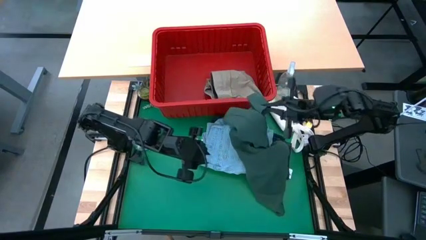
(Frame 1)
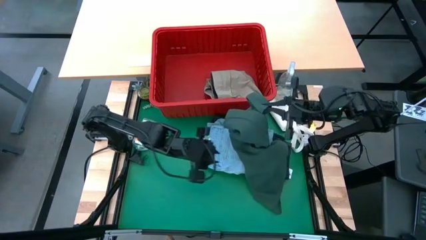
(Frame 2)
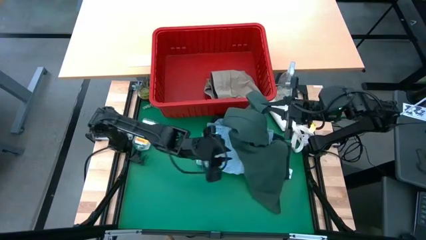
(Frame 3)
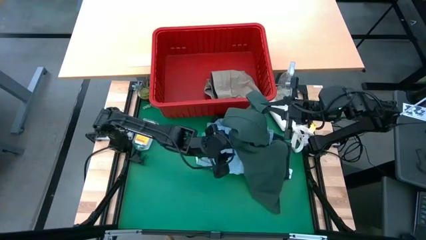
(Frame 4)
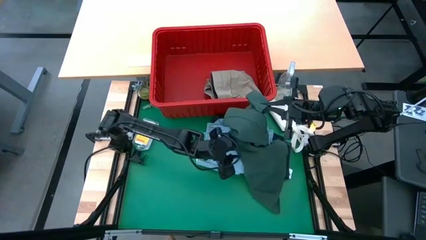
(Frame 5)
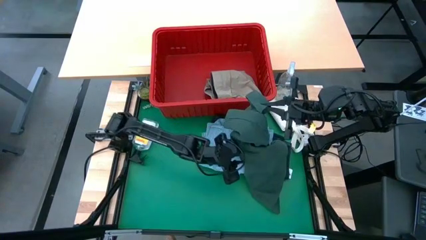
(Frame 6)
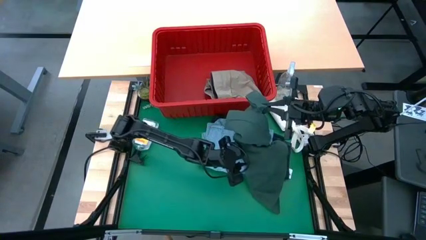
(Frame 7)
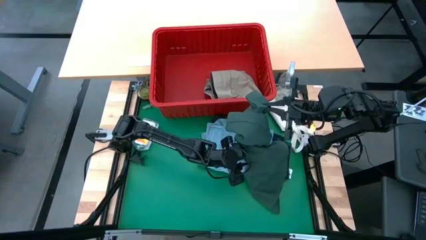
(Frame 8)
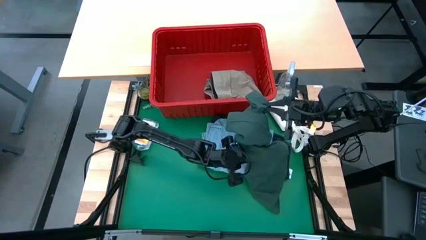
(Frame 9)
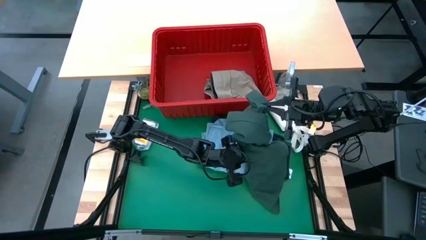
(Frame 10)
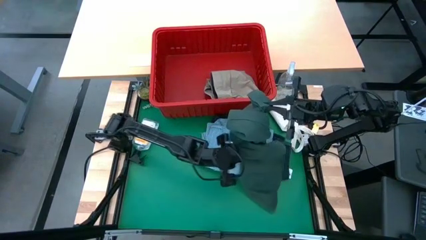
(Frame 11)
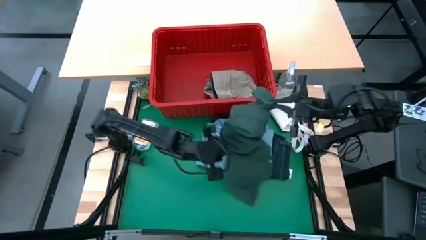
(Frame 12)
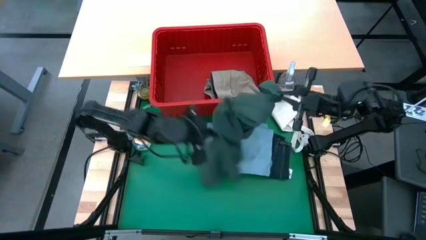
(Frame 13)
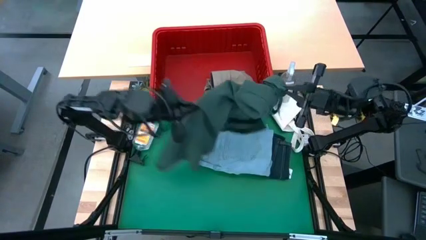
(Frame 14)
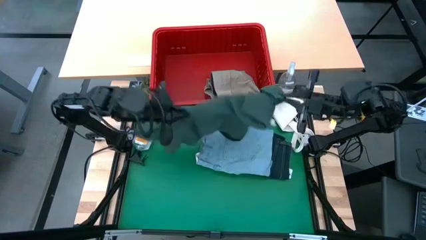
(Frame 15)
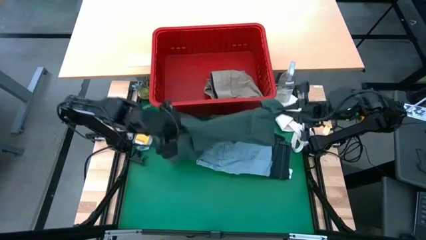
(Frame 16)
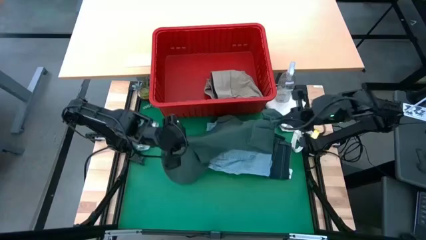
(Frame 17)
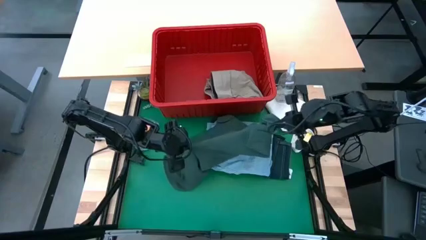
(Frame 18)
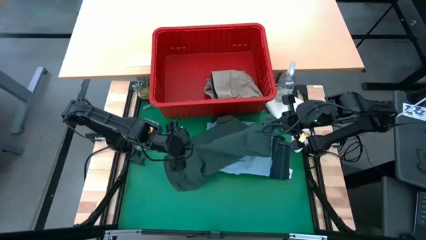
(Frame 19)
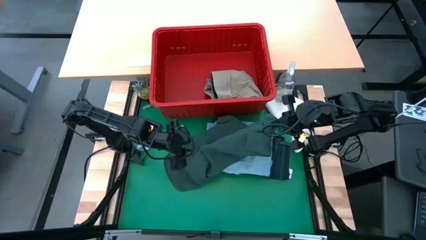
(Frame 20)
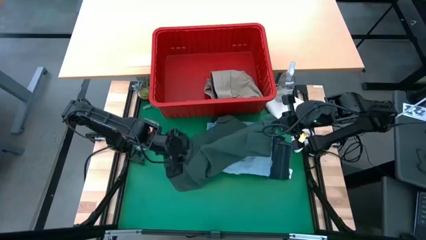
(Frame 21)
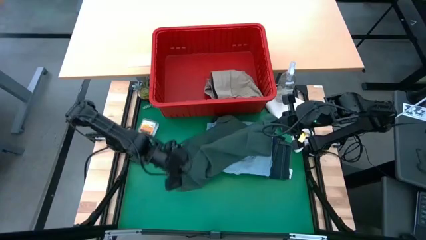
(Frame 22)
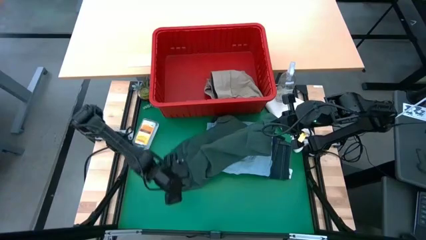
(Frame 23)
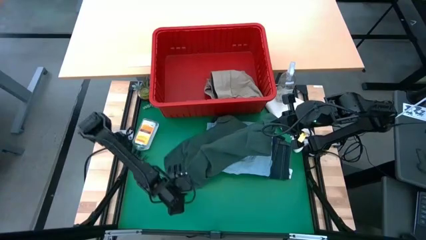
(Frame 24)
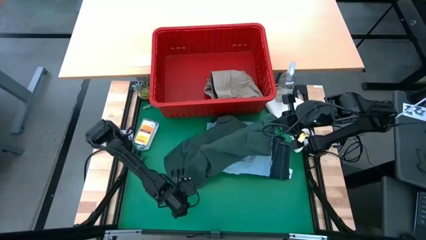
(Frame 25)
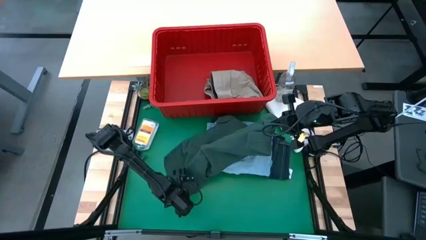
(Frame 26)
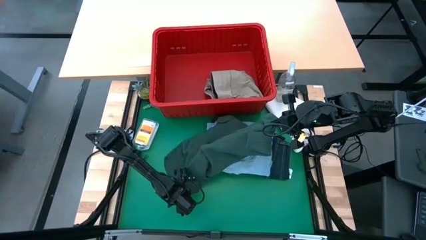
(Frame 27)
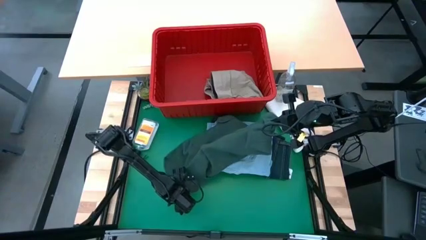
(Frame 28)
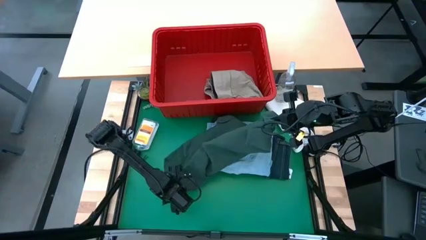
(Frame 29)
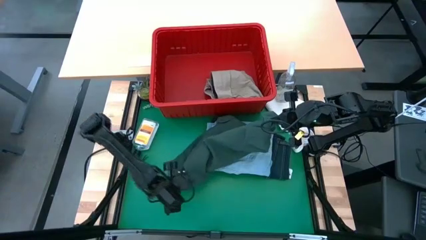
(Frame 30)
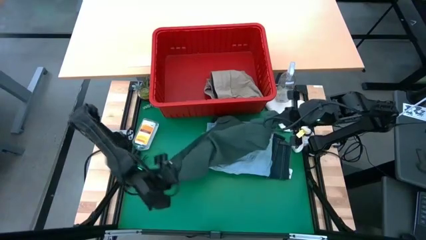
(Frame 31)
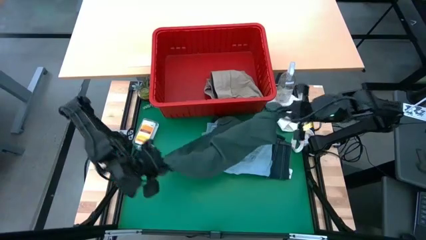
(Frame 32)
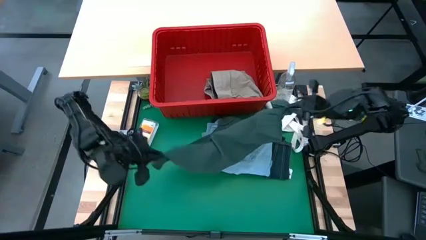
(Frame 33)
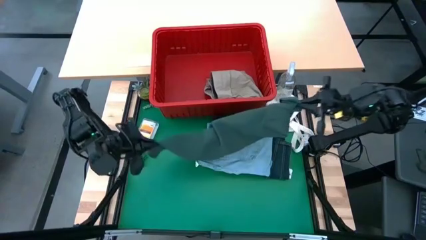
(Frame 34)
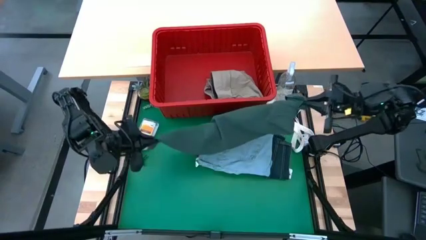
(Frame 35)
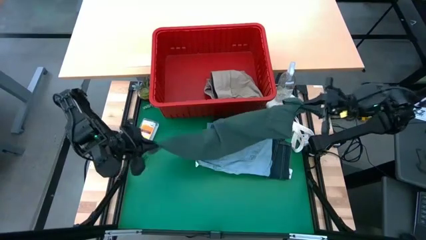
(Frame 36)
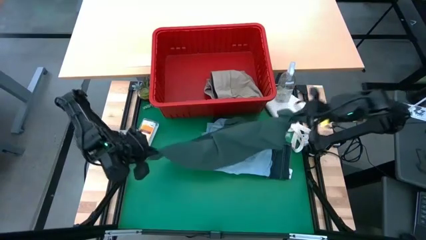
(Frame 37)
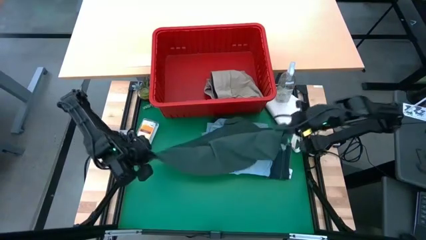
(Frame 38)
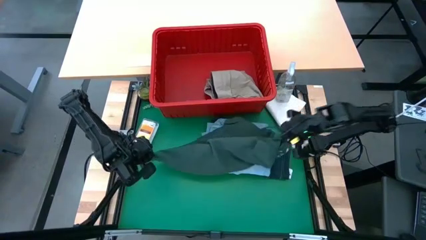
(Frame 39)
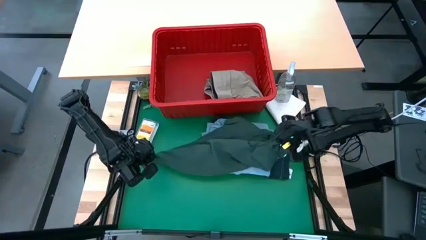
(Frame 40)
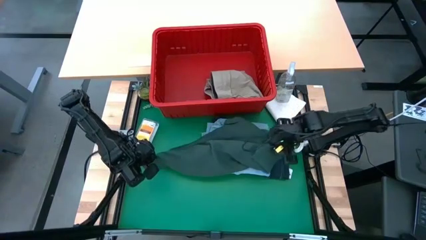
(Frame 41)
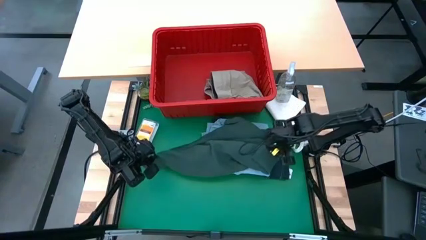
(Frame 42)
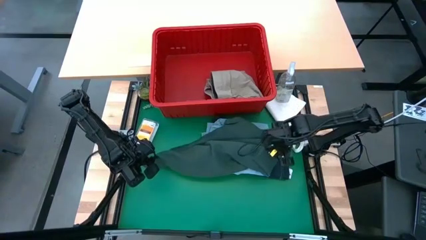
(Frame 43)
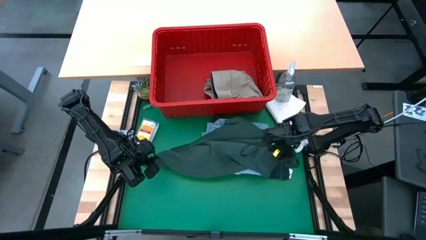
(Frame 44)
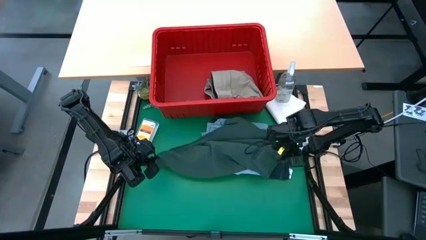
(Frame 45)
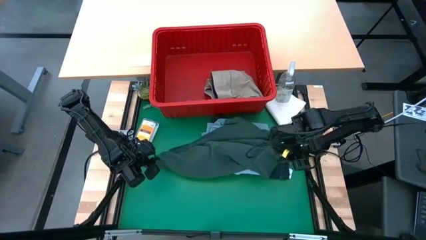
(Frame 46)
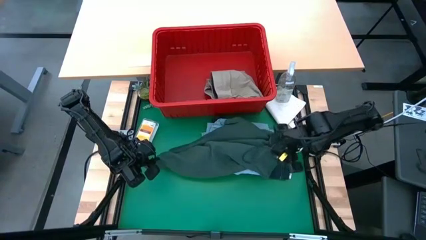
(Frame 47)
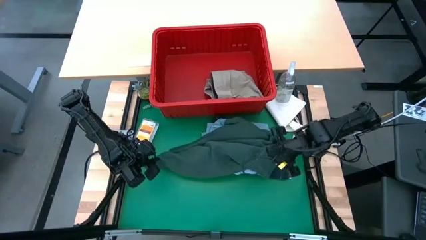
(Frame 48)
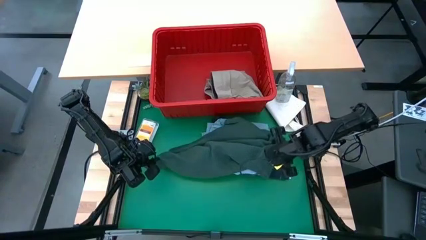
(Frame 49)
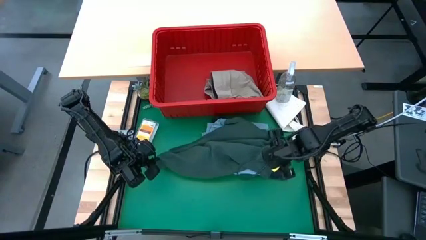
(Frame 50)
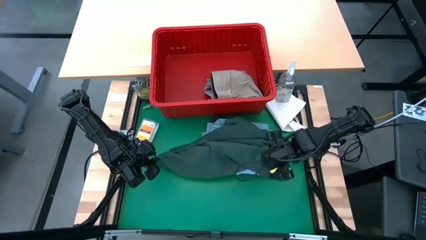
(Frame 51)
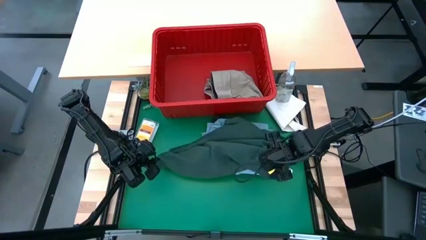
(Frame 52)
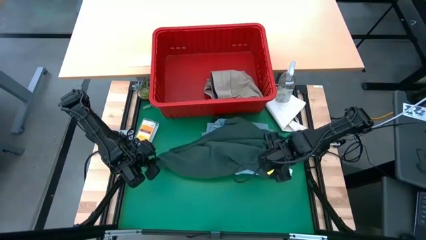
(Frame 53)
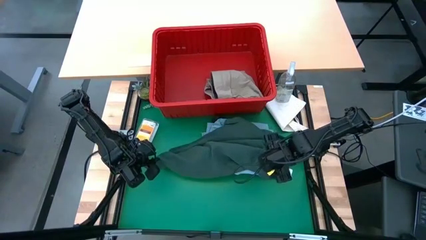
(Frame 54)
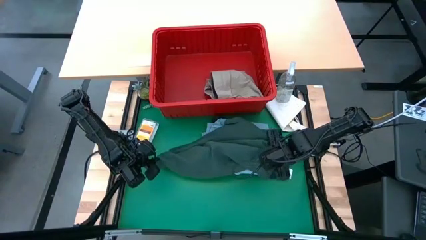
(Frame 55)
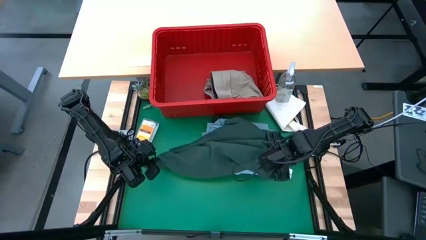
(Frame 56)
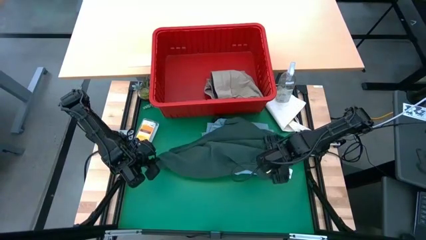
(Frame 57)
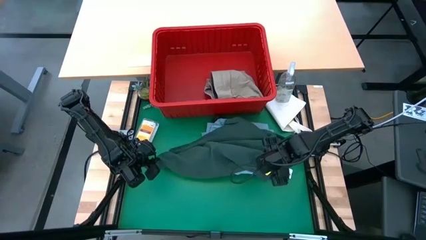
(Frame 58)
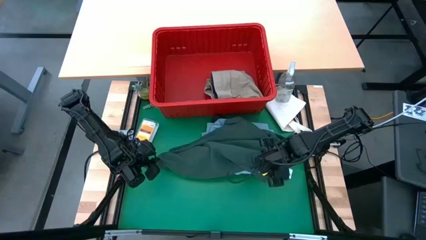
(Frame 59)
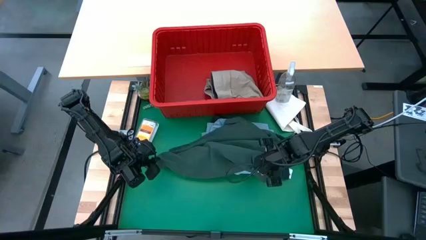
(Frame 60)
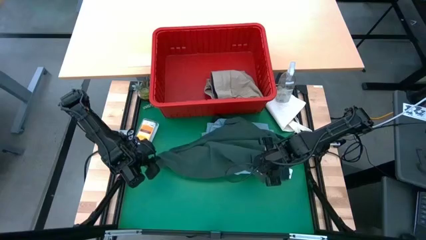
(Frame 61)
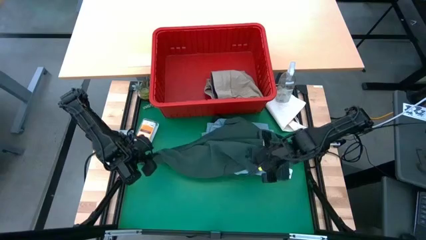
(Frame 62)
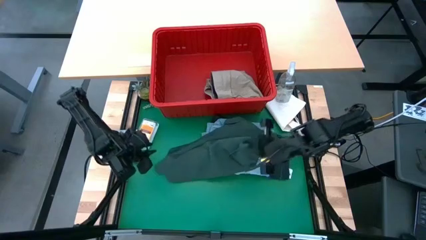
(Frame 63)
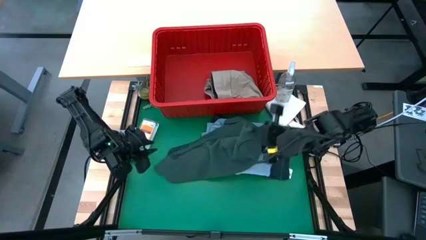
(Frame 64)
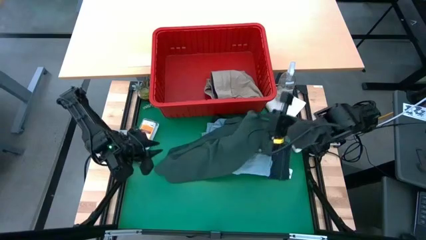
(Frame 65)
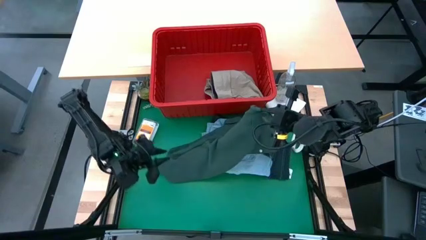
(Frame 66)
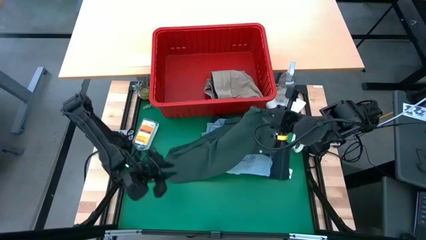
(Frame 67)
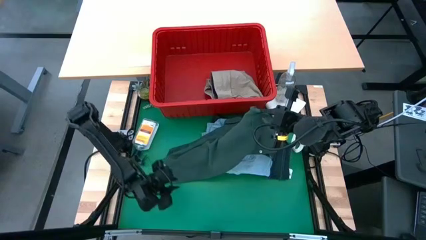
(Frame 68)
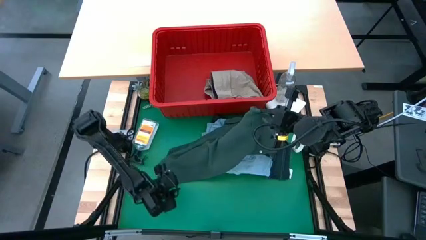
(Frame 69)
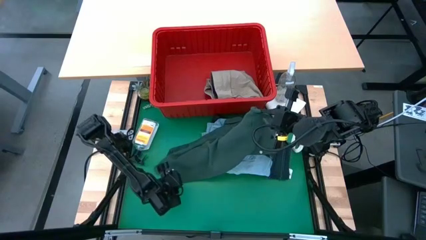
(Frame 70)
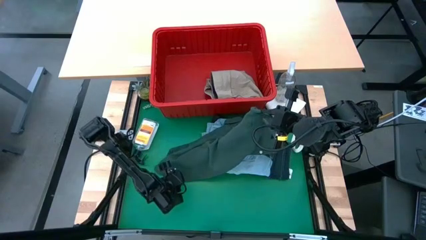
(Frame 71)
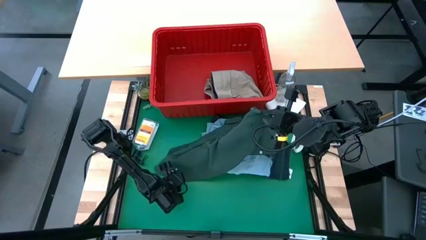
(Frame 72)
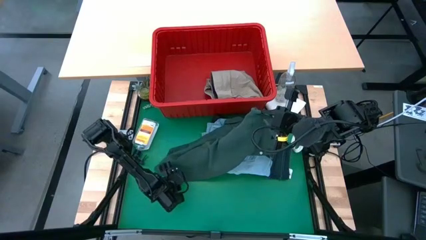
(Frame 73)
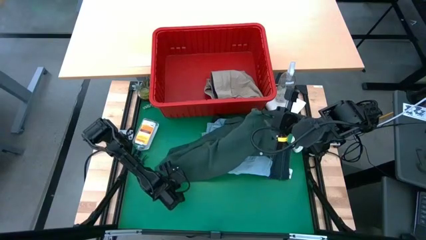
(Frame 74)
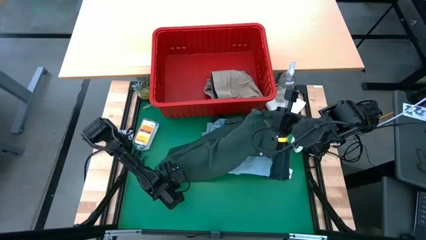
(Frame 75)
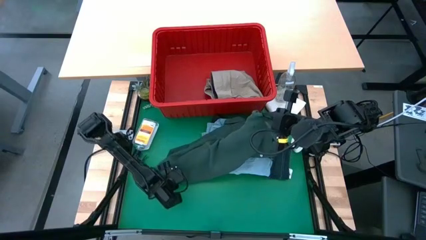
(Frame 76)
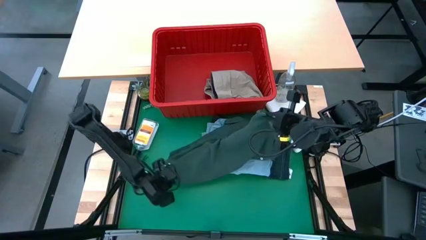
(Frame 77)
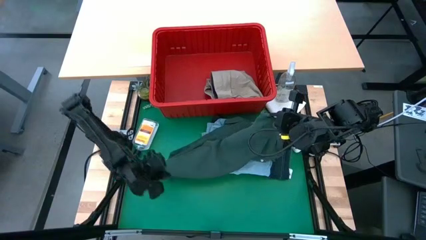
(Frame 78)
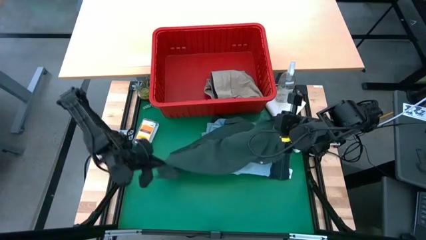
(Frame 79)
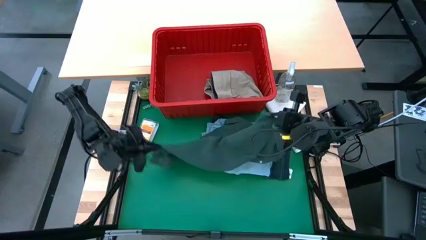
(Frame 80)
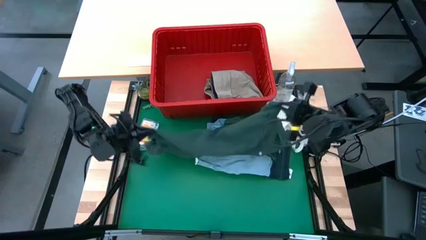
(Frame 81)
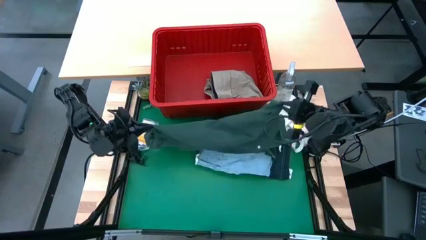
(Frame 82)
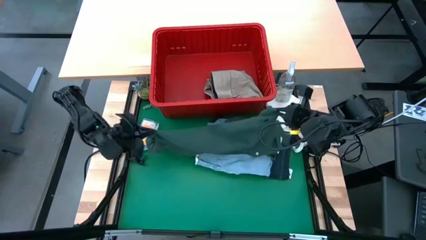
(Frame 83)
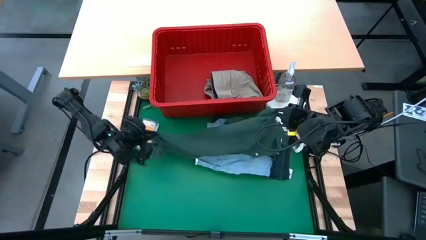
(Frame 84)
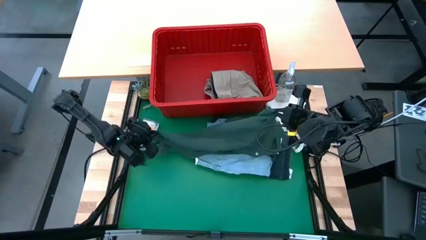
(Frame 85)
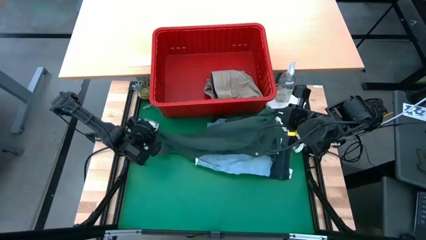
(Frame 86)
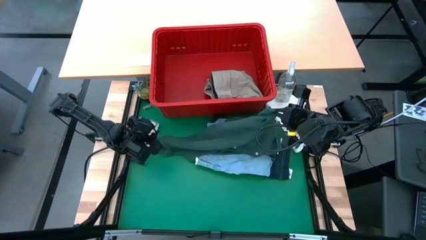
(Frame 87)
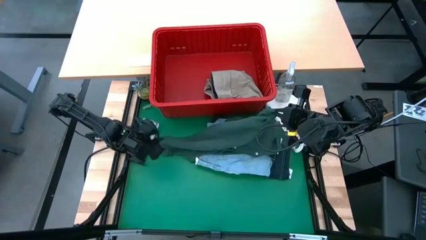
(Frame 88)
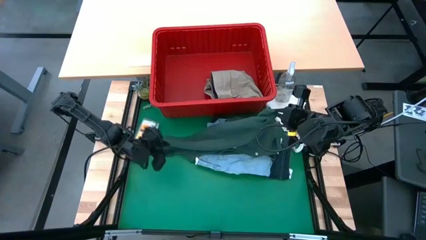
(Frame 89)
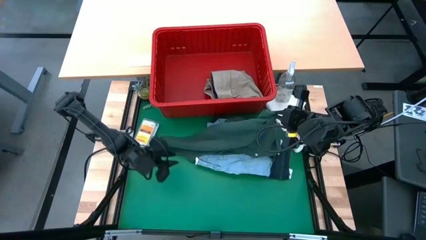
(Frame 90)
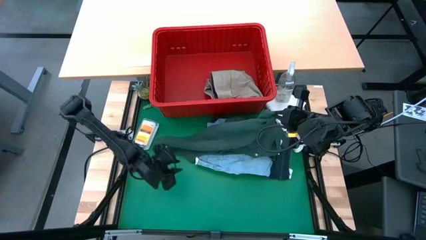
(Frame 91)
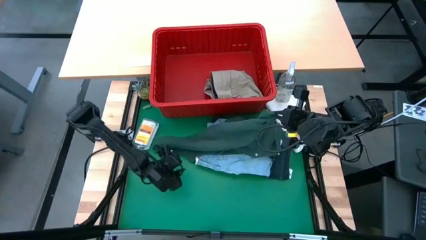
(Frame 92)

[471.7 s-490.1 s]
Task: Fold laundry
Fold the green shirt
